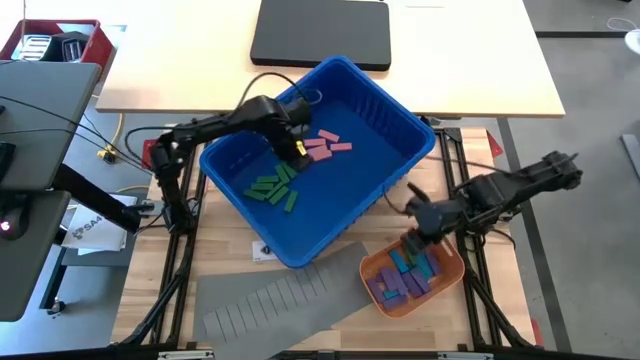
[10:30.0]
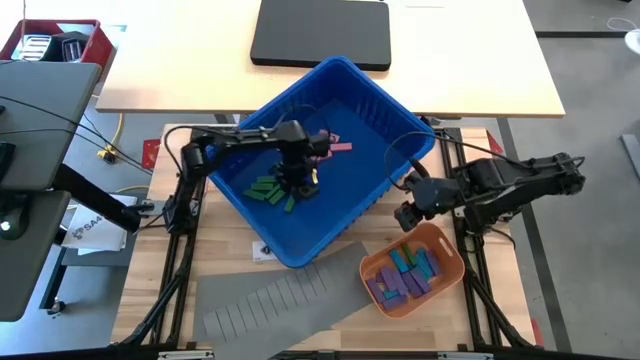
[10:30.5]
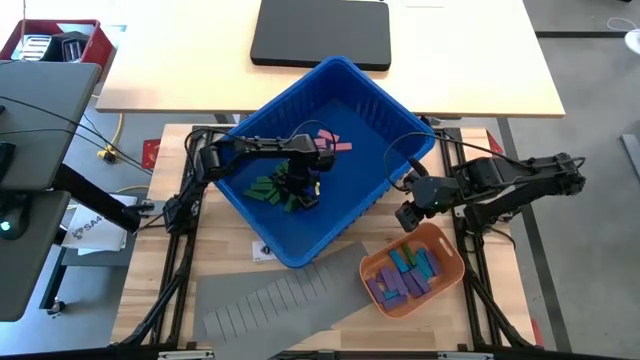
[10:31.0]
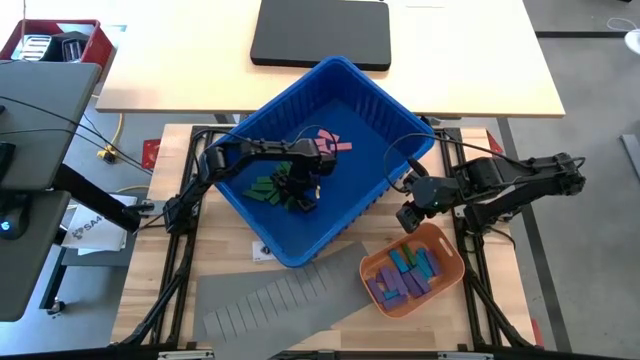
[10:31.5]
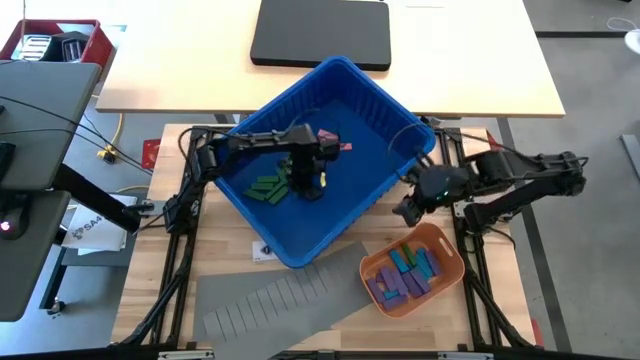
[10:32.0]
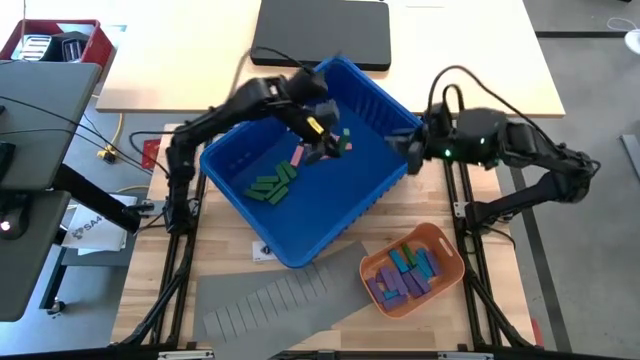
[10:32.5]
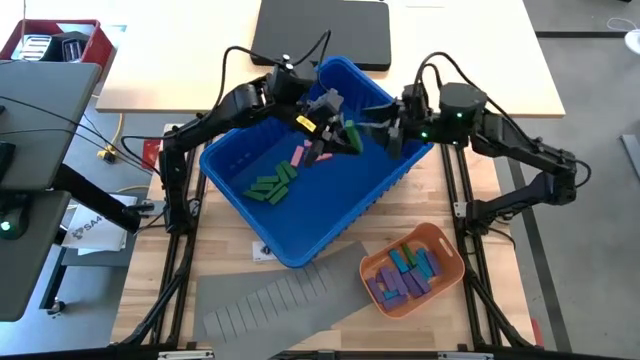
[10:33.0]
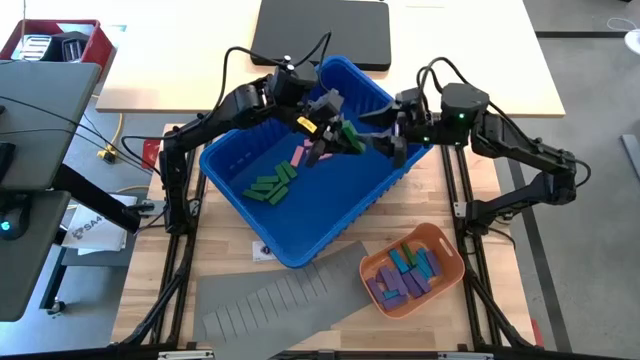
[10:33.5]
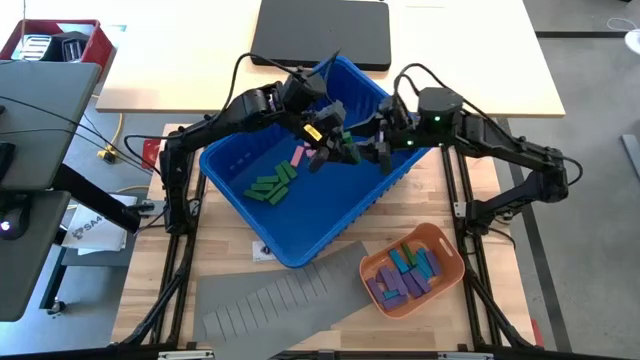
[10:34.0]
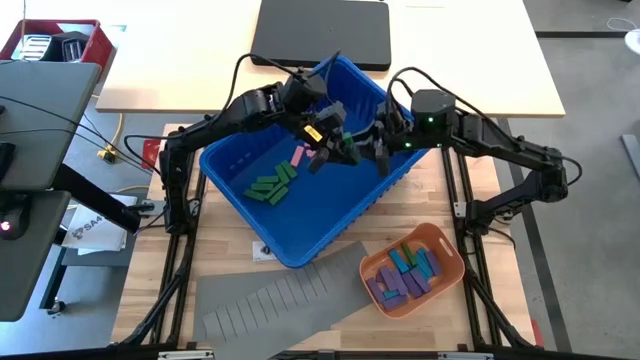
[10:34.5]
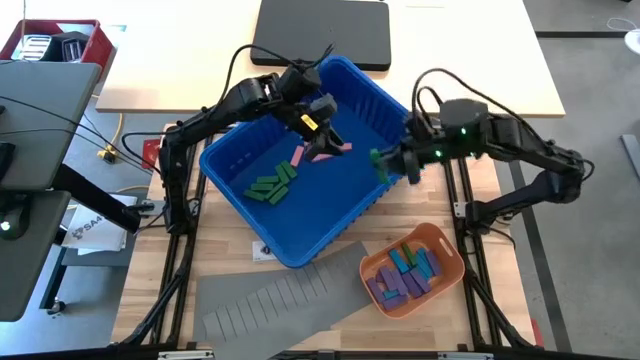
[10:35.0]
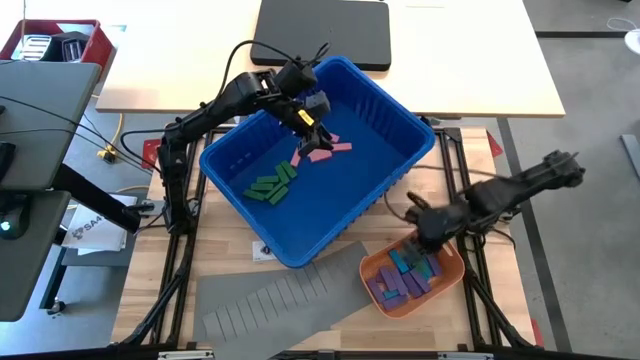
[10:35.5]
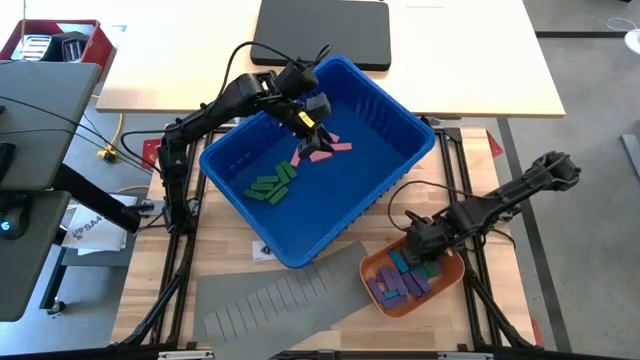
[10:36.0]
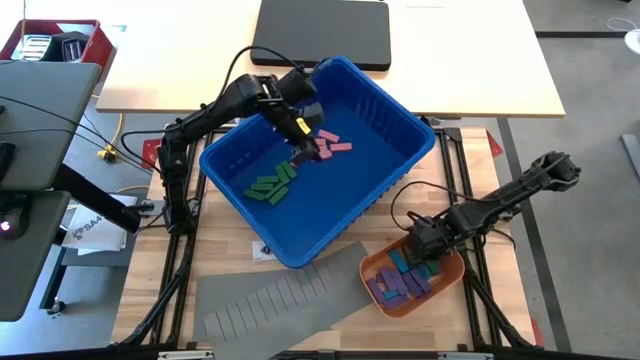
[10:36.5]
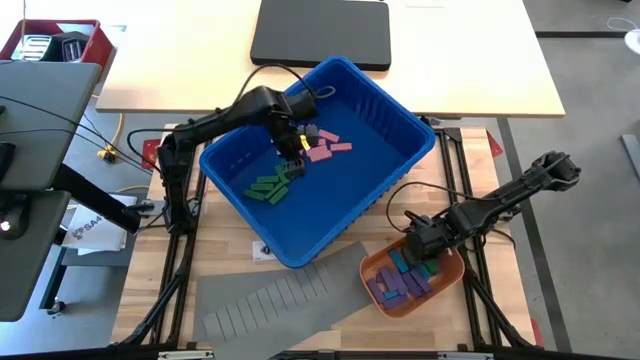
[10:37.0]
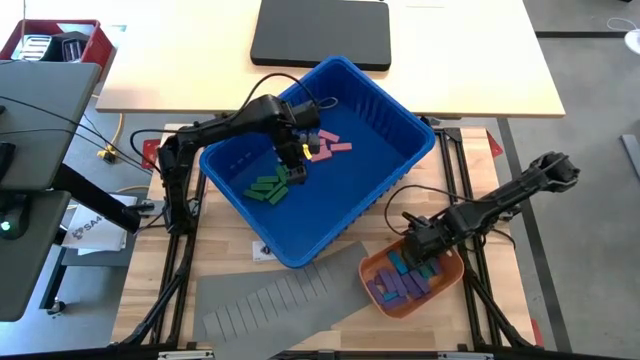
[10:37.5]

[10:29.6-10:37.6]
Task: Sort blocks
Put the green block into the orange bin

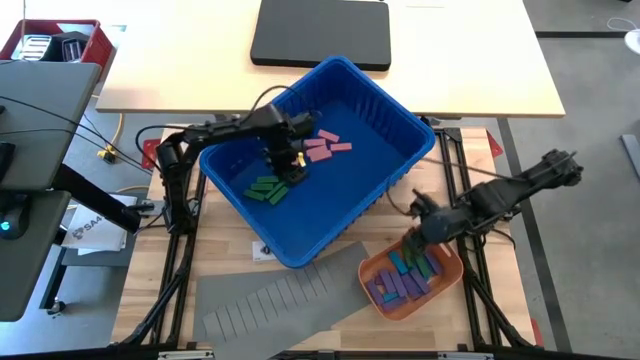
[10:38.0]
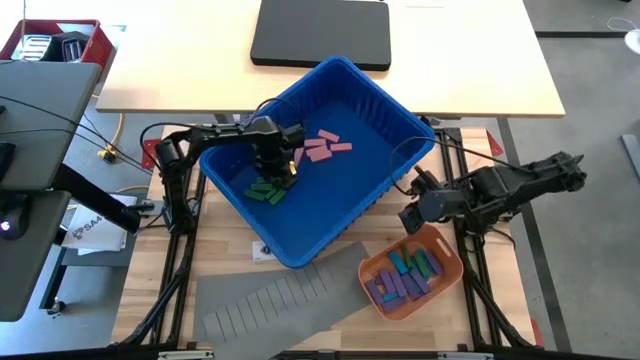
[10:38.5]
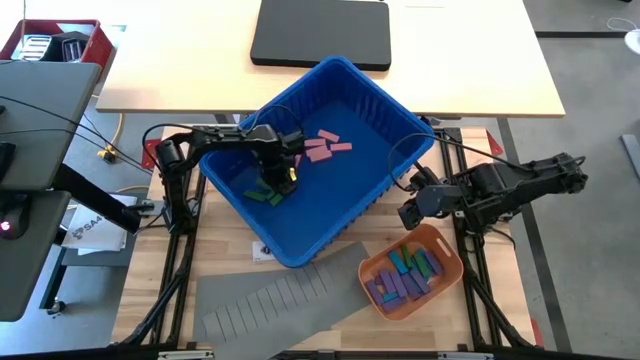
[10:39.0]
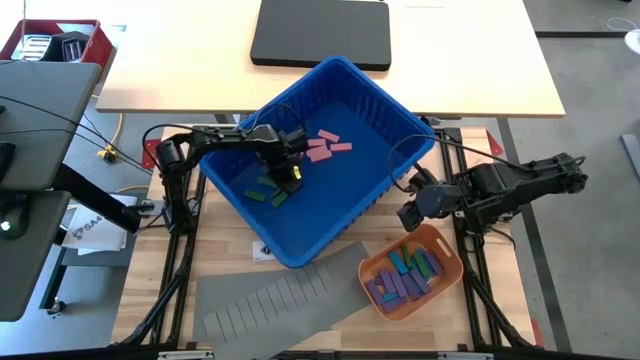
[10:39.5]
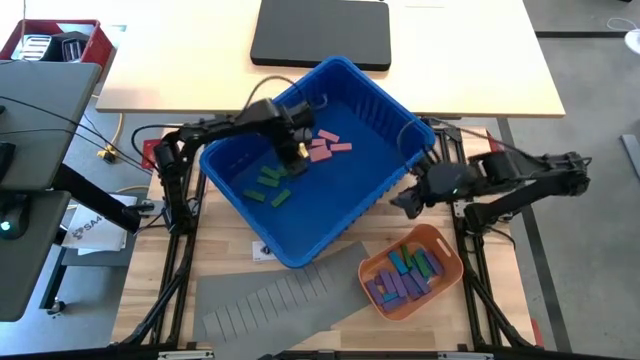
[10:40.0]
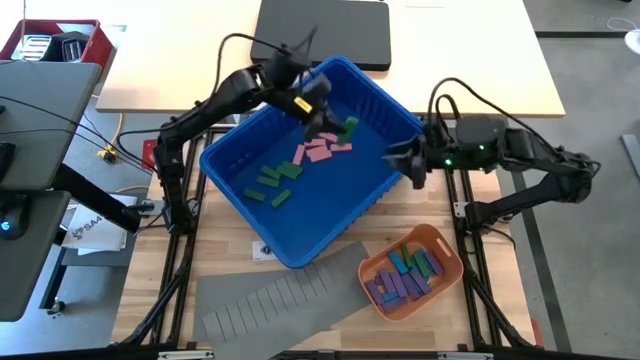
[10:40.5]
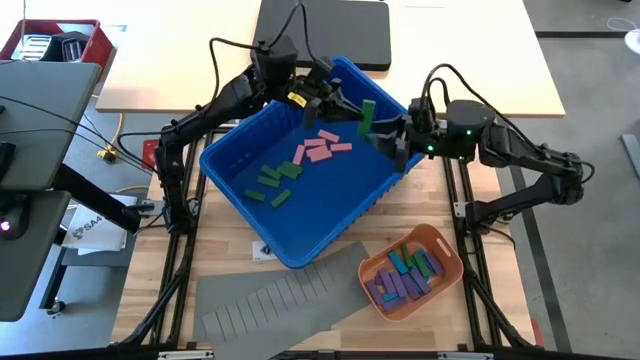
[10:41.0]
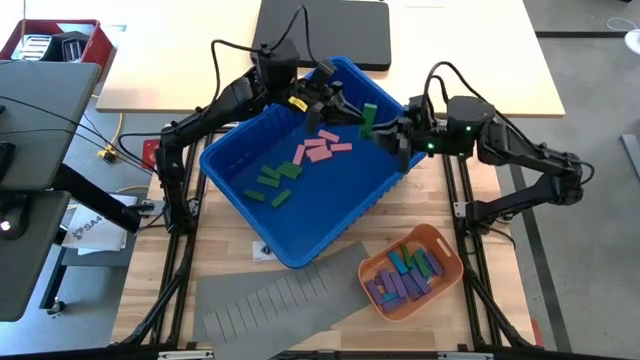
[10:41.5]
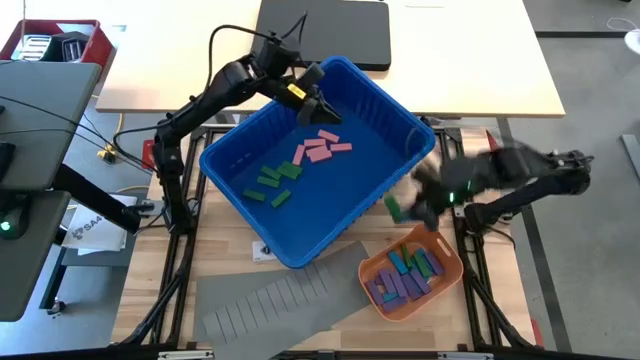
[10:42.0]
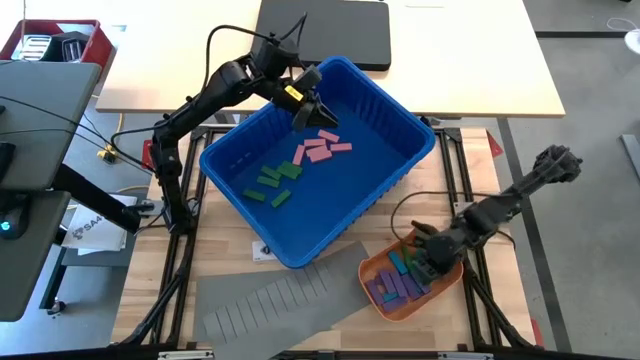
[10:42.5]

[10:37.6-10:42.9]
Put the green block into the orange bin

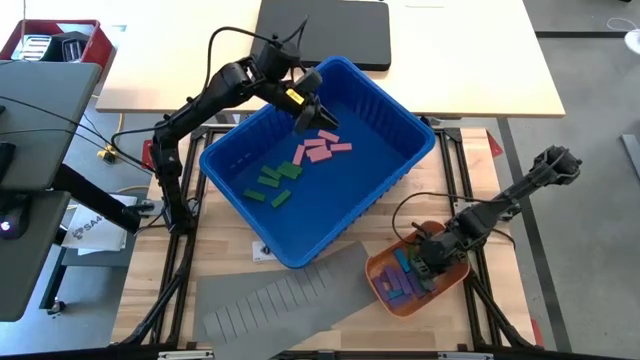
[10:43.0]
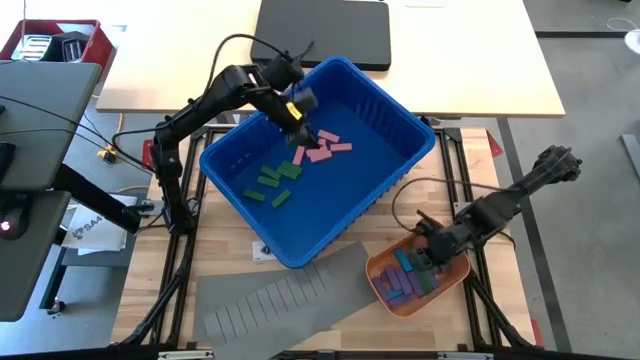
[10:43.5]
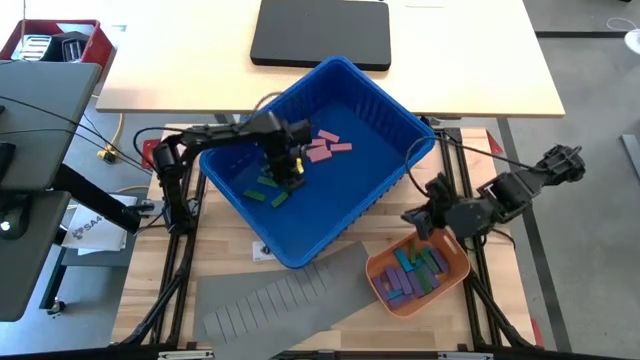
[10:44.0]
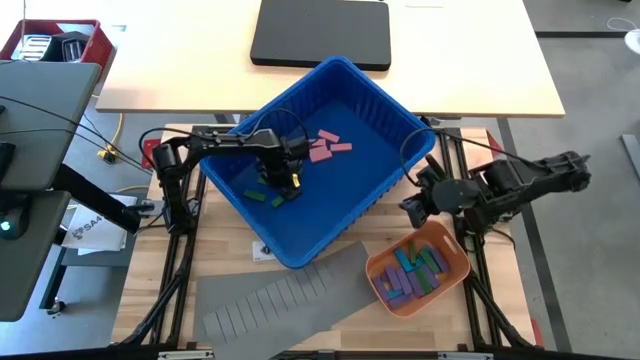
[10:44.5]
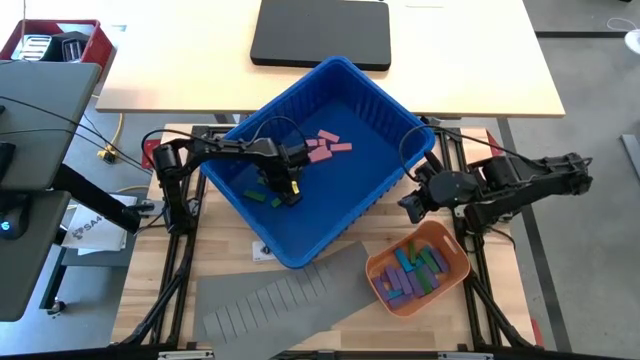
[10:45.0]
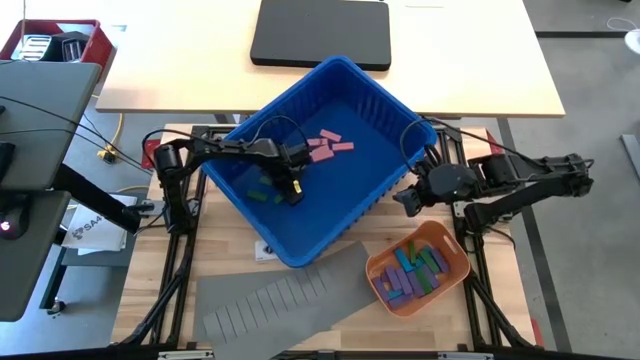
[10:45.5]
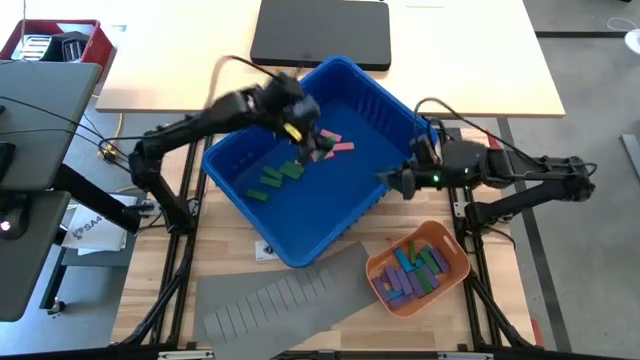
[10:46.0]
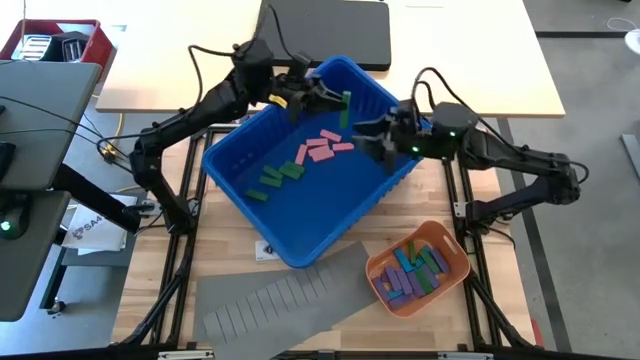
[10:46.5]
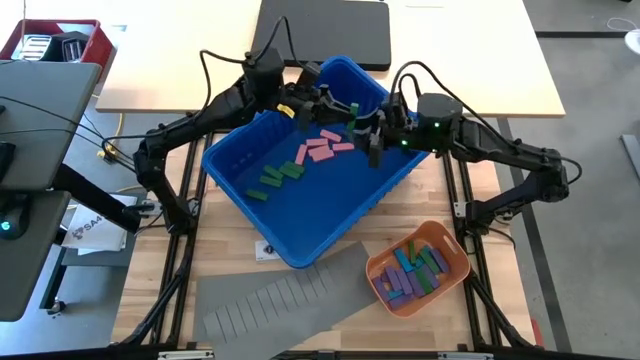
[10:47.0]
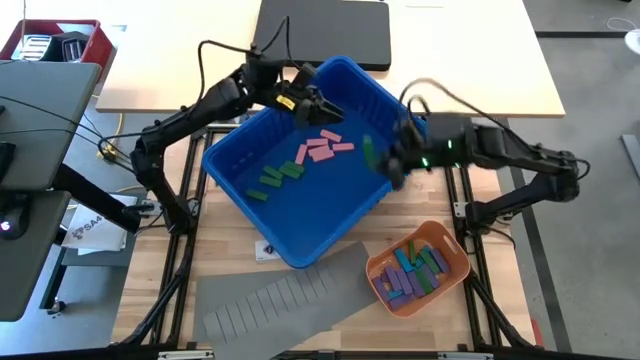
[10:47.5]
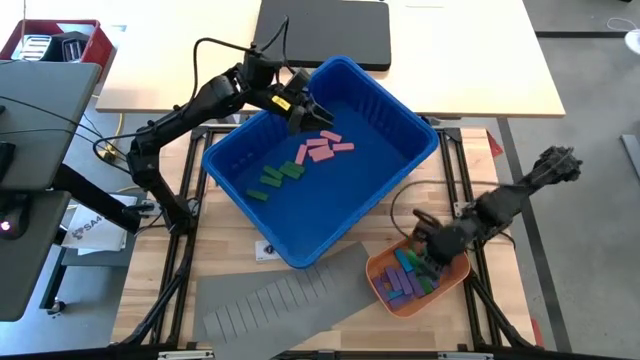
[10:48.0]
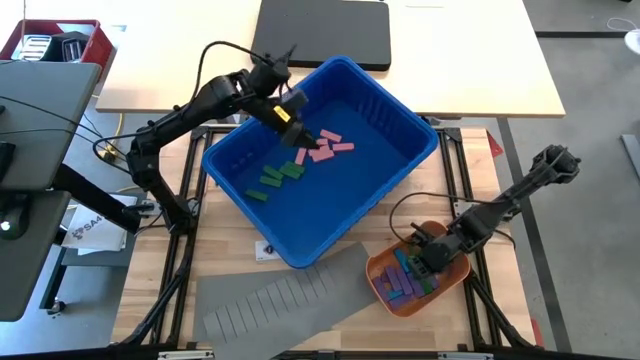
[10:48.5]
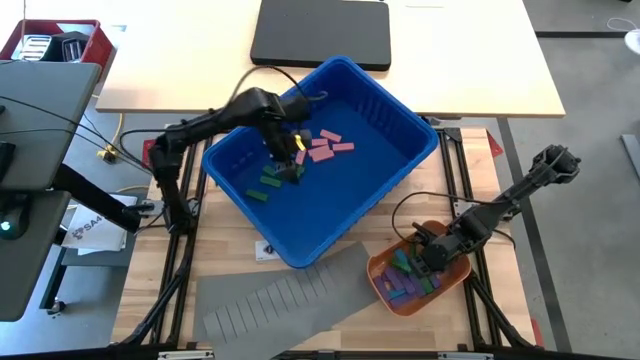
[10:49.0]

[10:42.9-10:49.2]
Put the green block into the orange bin

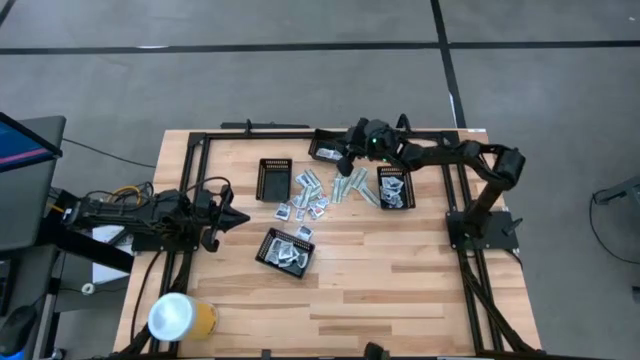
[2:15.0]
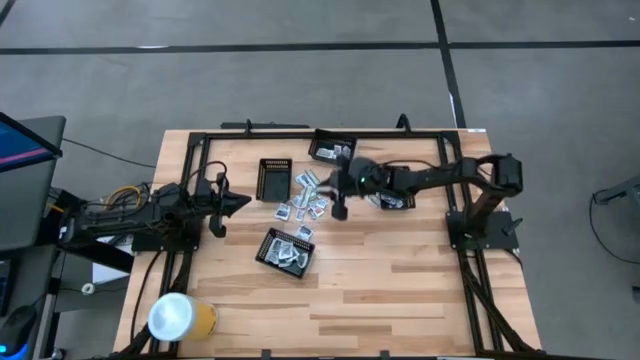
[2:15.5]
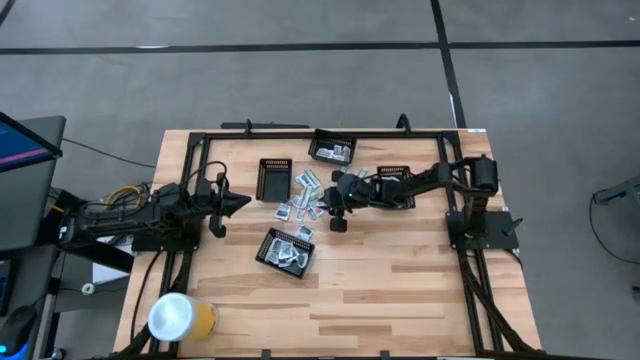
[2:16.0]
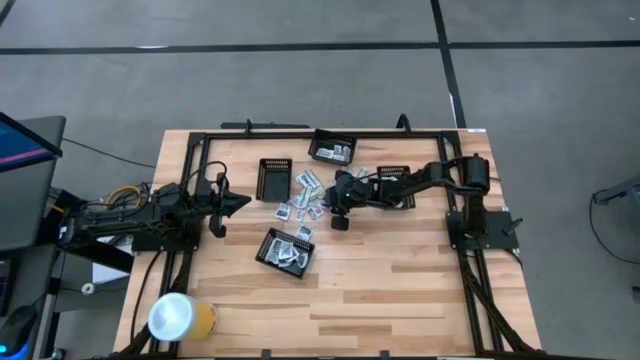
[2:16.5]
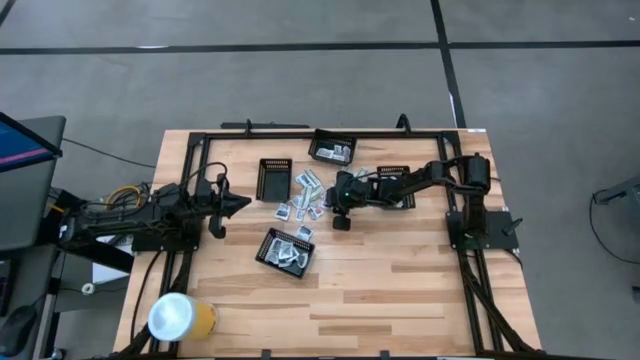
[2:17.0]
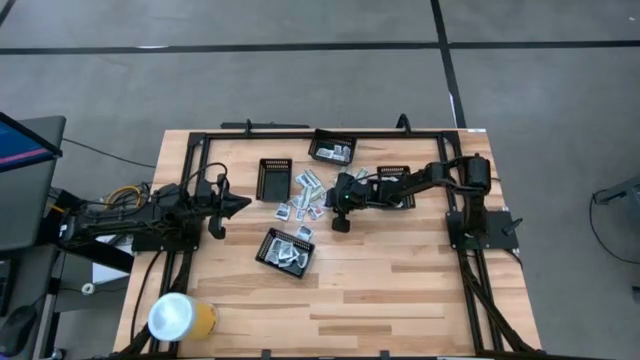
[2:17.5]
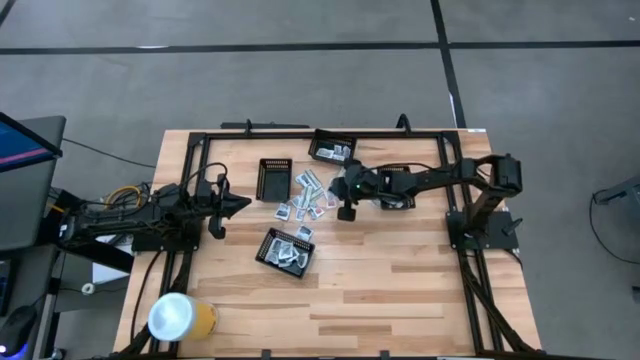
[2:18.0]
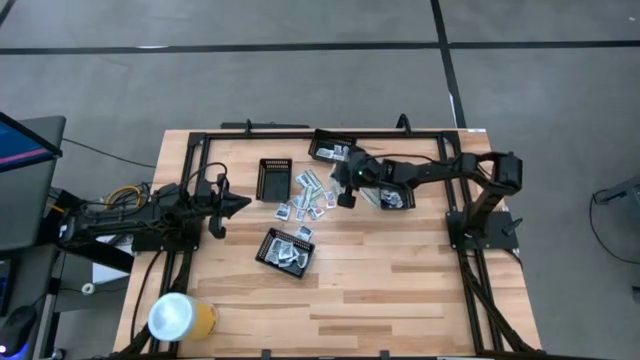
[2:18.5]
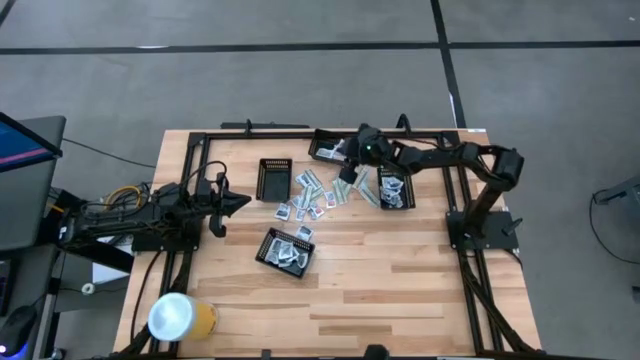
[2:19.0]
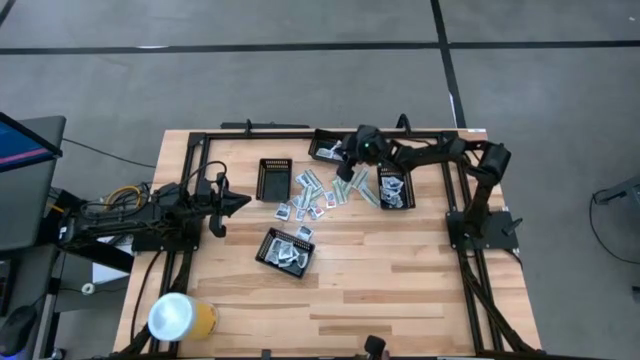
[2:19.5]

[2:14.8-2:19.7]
Task: Pick & Place First Aid Supplies
Put the orange ointment pack into the top black bin
